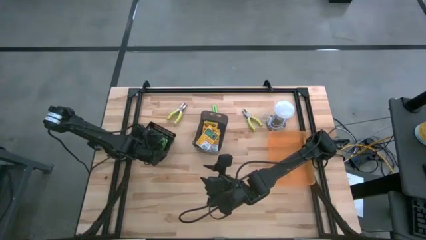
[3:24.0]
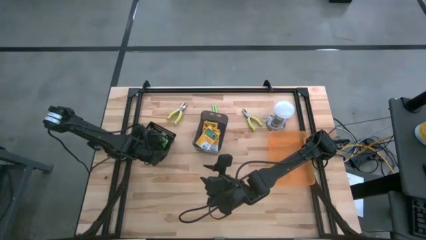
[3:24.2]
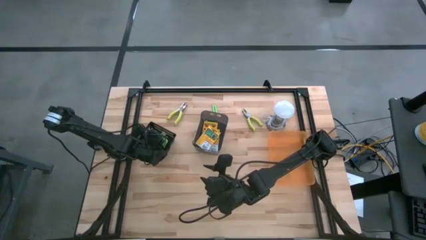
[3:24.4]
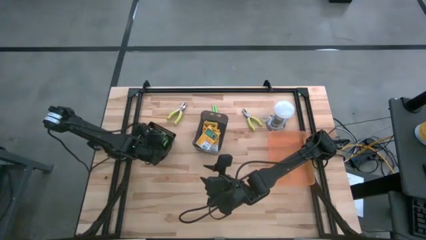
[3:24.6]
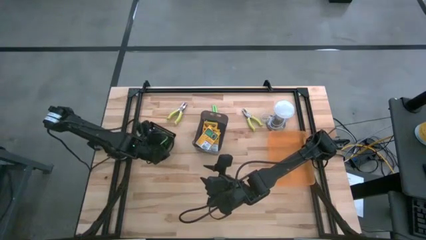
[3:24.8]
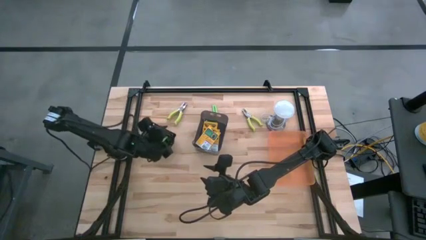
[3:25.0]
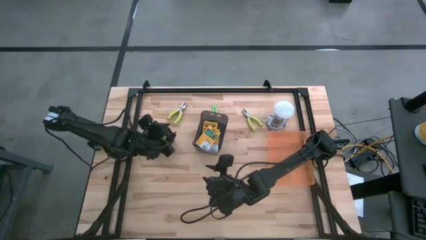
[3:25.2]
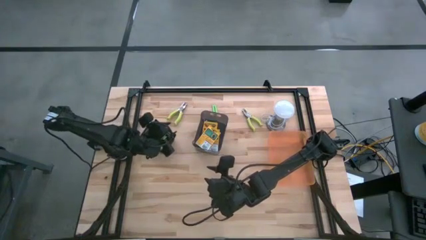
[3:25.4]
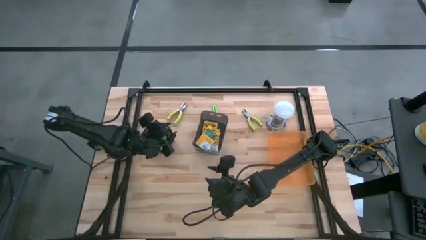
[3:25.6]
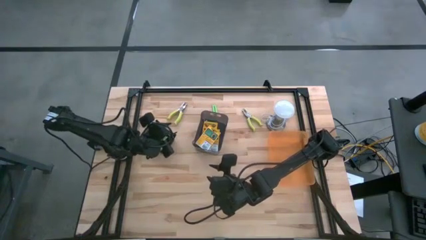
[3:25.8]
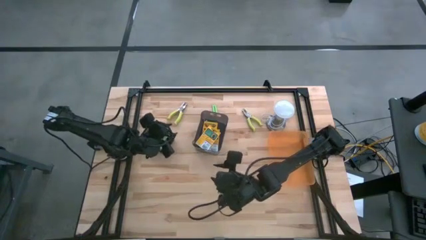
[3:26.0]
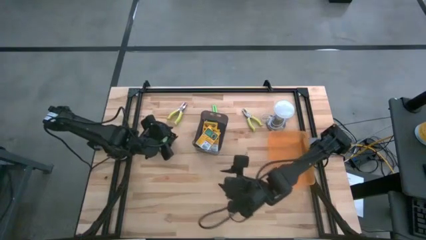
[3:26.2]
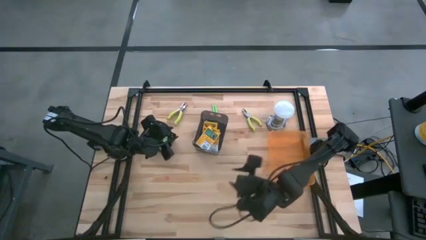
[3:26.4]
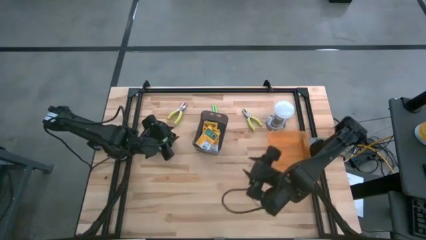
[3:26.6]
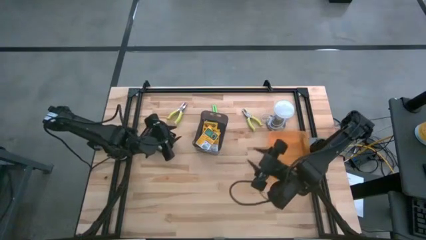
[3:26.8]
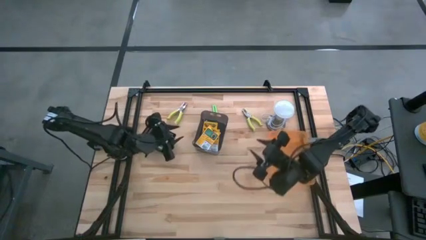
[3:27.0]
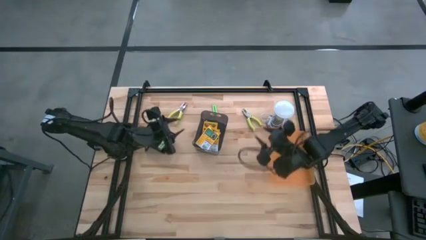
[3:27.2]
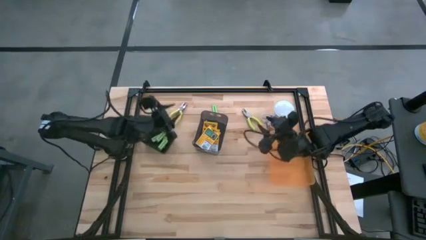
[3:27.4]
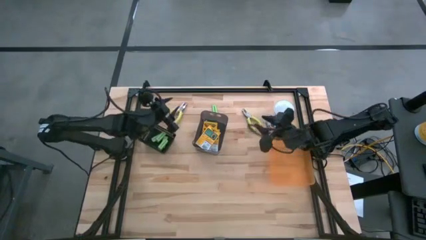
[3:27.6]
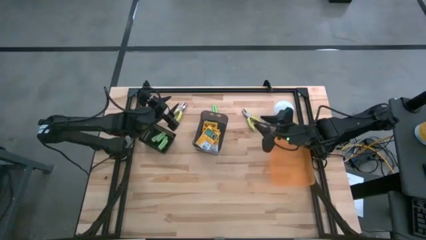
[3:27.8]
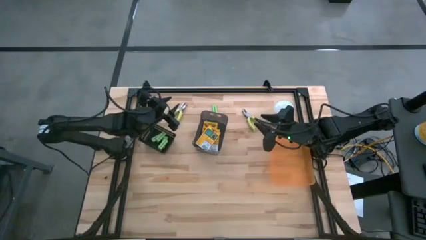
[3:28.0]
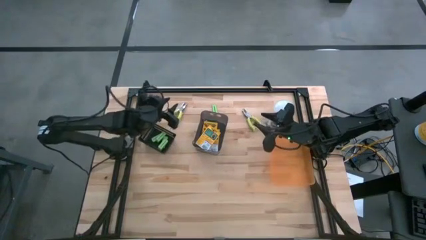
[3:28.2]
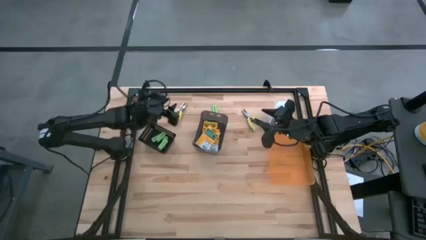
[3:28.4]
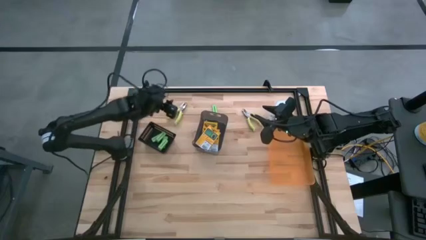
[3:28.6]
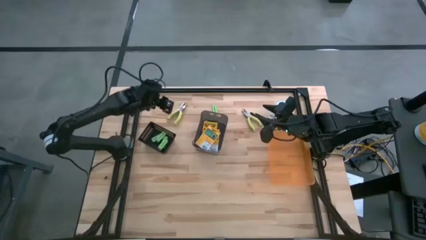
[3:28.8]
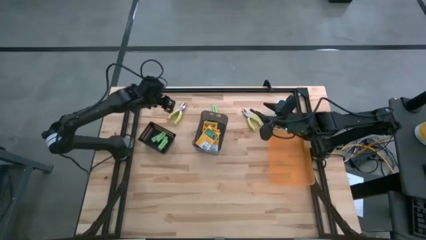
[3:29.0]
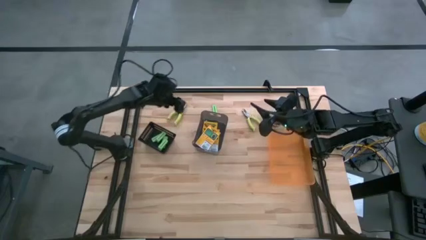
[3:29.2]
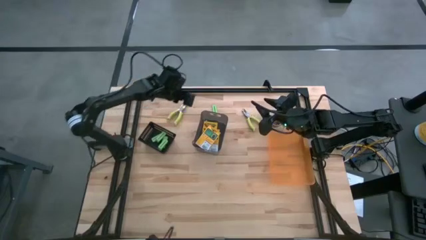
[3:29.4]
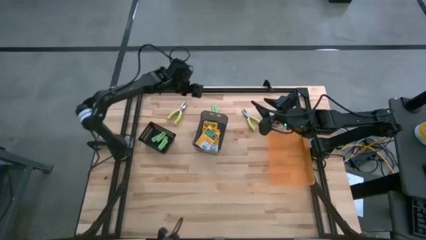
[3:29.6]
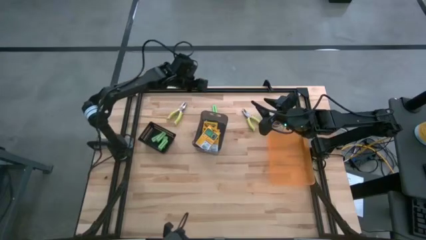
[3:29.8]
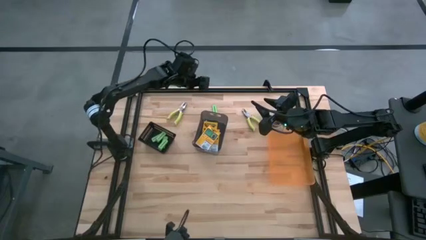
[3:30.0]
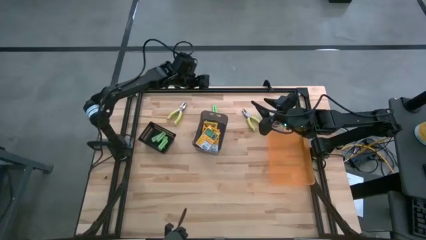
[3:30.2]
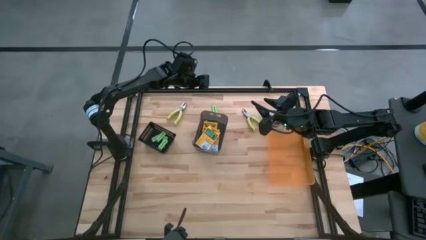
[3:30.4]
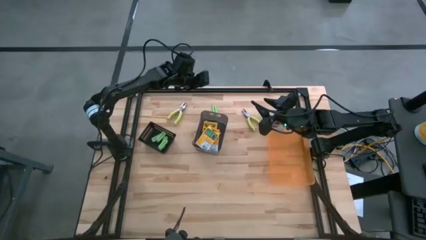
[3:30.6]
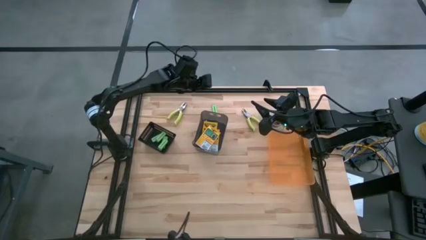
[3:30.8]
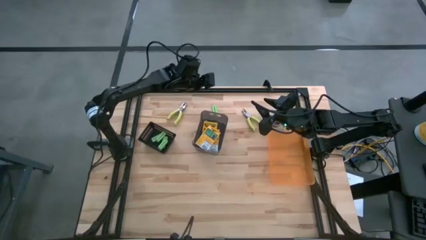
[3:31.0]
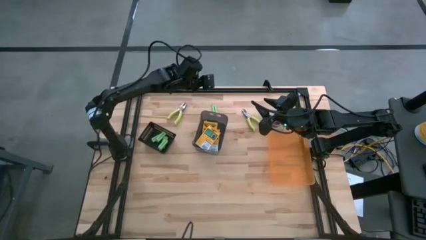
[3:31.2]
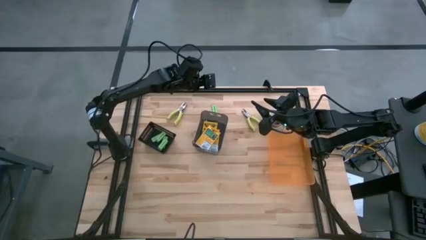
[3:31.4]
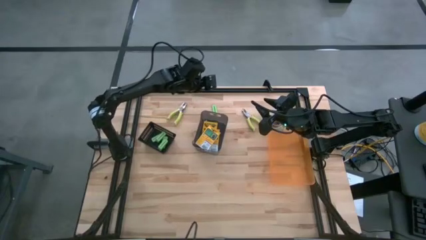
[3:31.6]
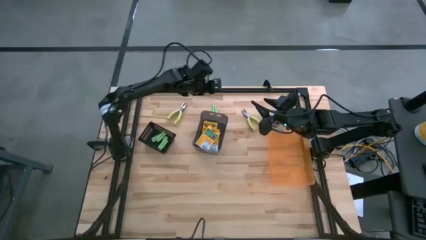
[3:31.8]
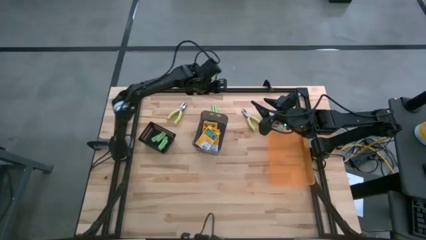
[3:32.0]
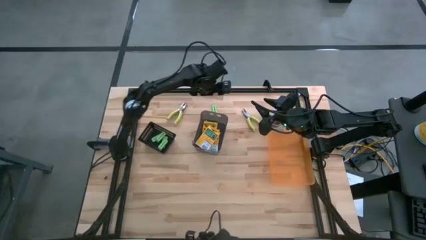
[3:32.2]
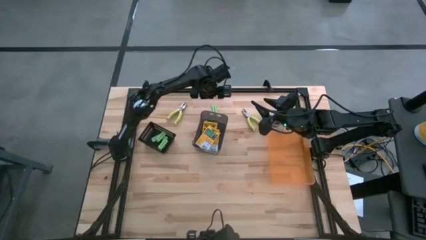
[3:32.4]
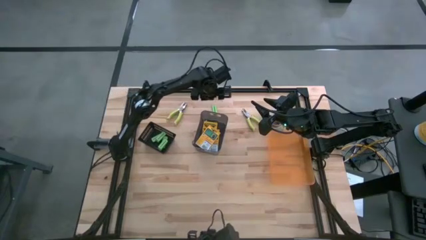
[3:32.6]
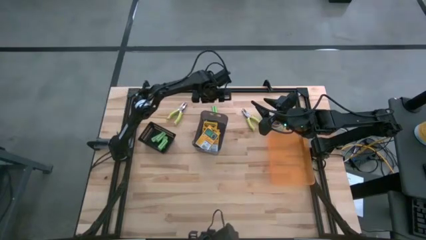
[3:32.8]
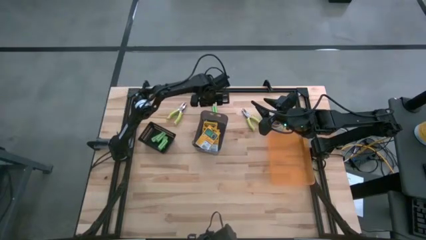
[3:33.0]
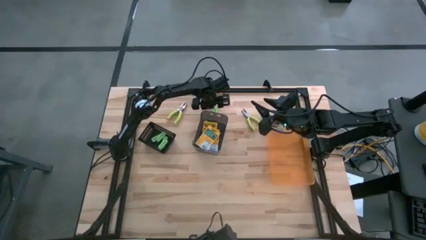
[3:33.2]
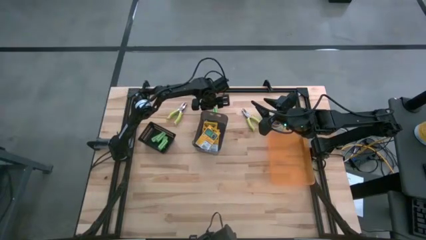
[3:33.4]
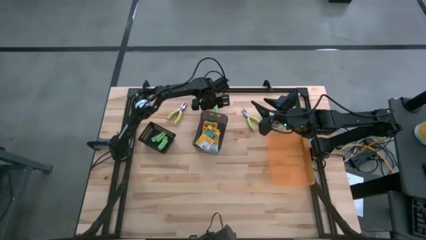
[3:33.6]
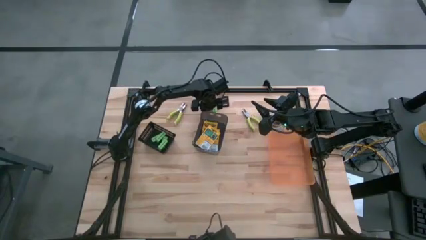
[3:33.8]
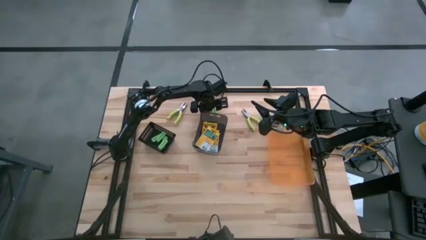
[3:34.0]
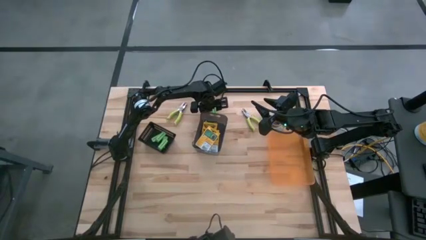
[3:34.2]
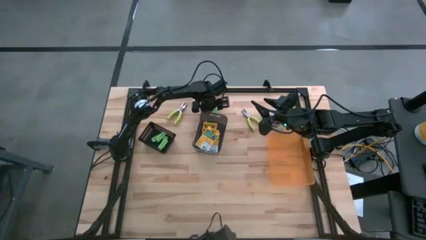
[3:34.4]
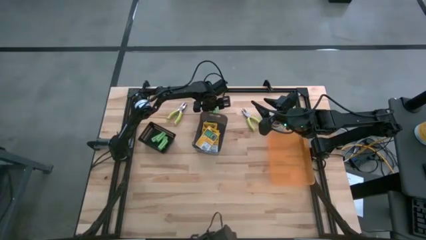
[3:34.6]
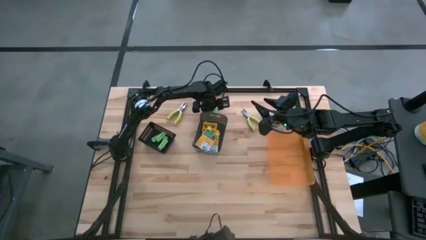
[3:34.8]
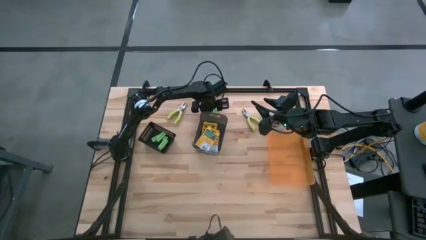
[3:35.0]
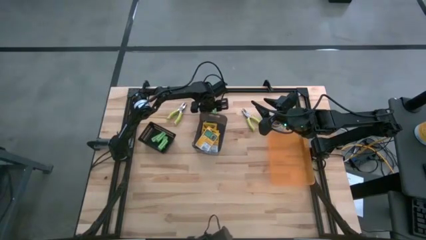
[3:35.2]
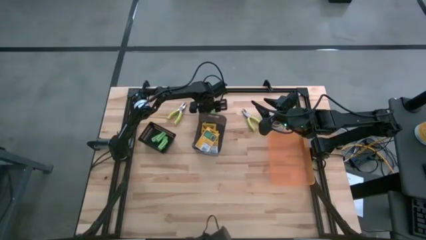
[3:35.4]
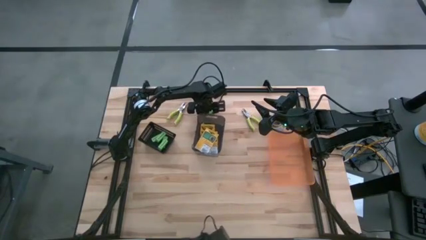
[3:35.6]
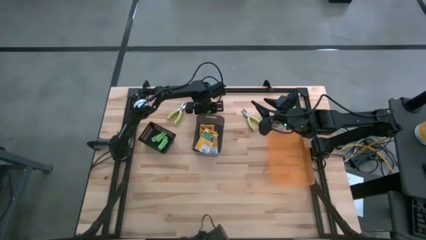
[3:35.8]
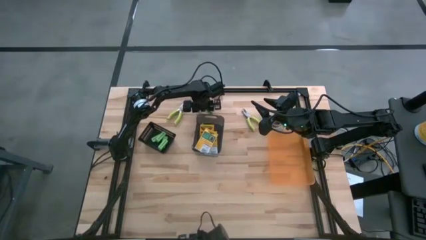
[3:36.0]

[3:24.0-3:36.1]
Task: Pick & Place School Supplies
Put the light green eraser into the black bin

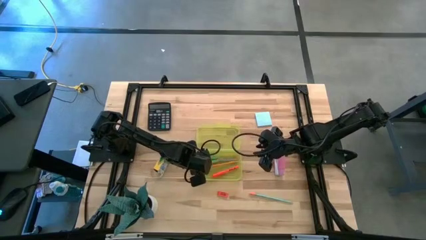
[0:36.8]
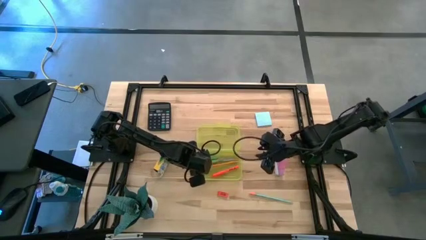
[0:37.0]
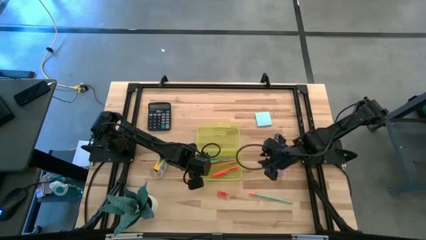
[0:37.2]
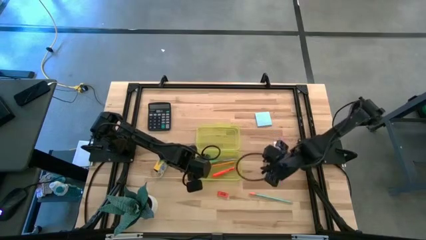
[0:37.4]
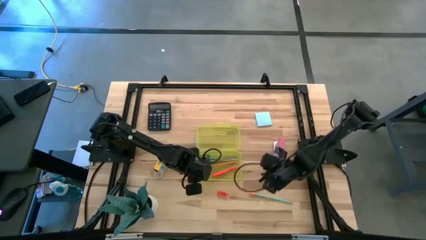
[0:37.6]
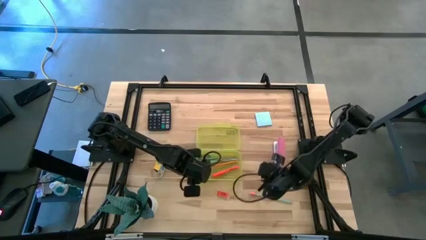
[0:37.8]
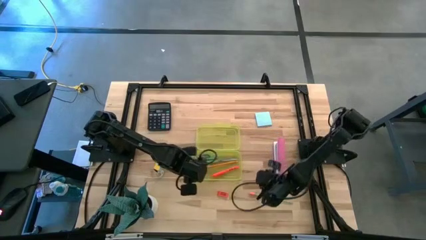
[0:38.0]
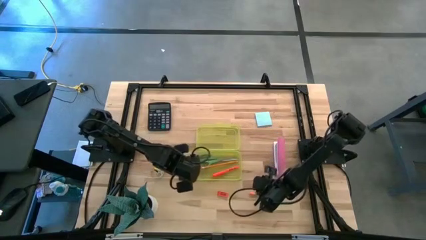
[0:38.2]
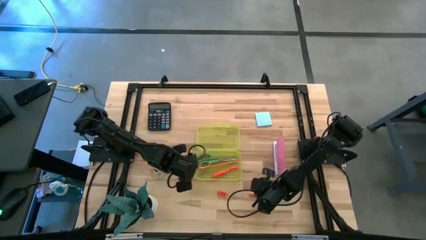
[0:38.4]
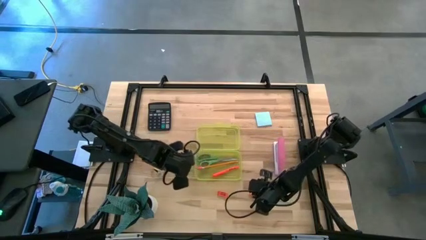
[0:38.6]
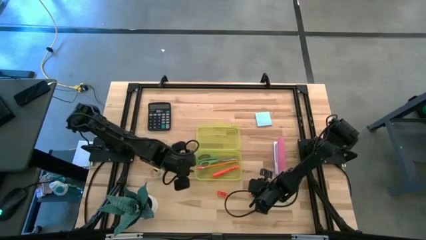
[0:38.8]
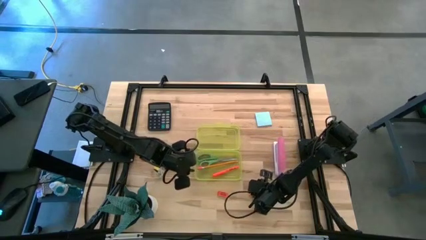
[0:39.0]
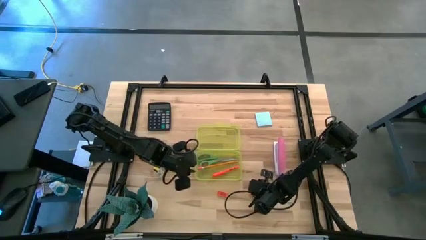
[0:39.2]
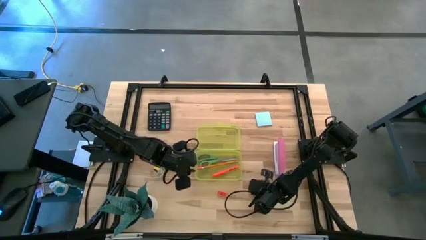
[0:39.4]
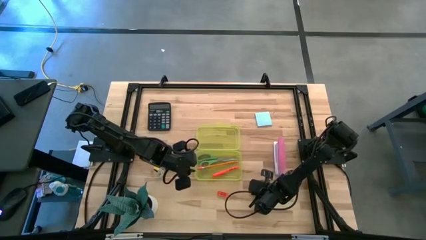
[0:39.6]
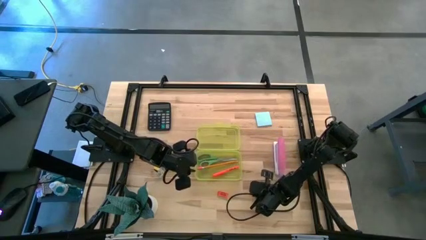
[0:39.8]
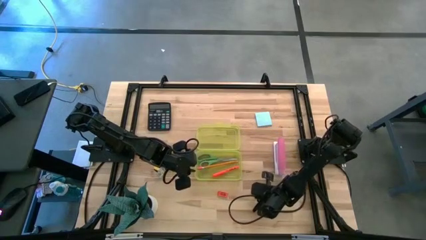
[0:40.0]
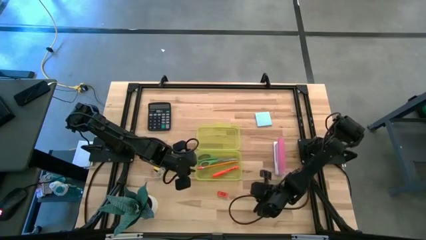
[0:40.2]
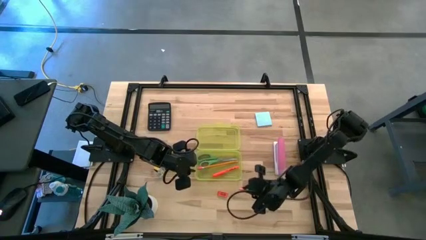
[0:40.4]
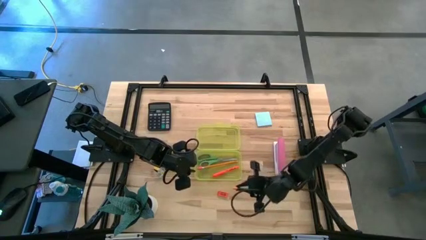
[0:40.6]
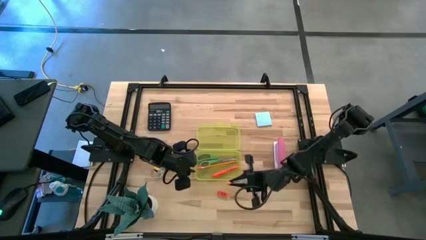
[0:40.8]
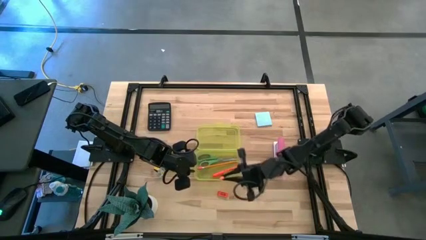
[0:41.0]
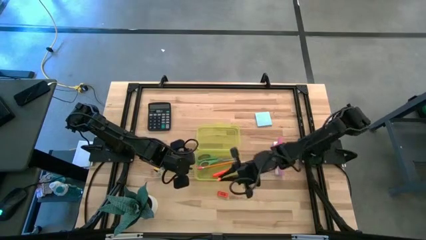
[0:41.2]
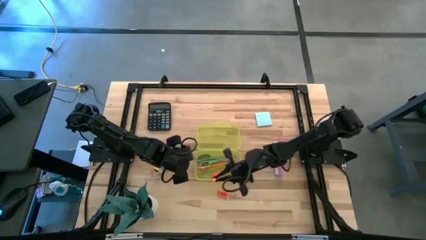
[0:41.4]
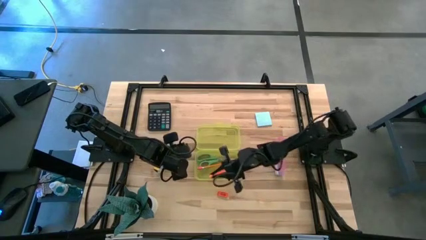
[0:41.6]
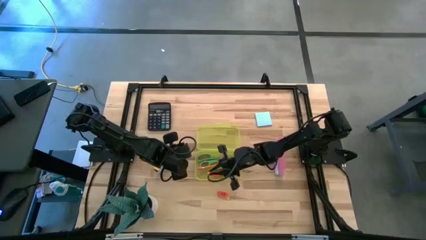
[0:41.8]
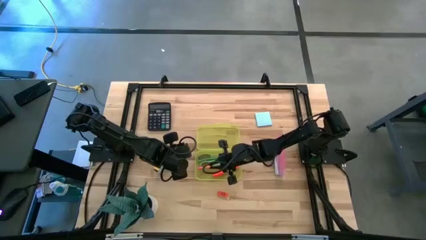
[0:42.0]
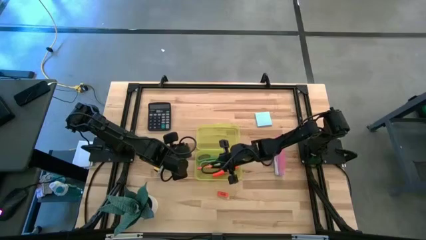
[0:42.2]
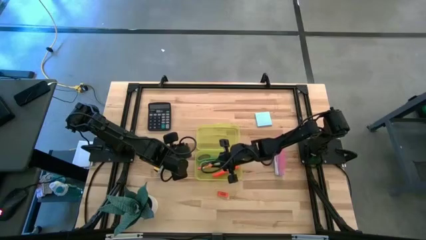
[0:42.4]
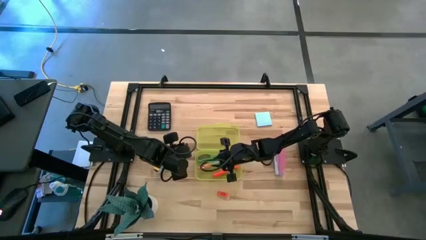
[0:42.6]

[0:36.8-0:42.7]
Task: Pack school essentials
Put the light blue pencil into the yellow supply box
